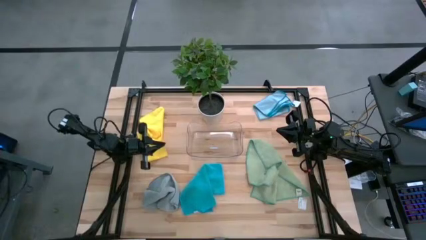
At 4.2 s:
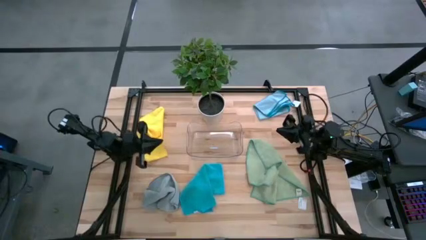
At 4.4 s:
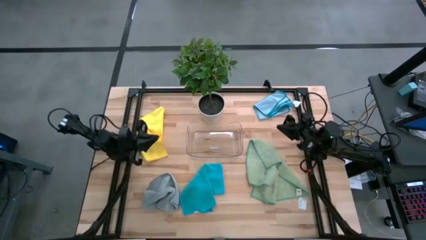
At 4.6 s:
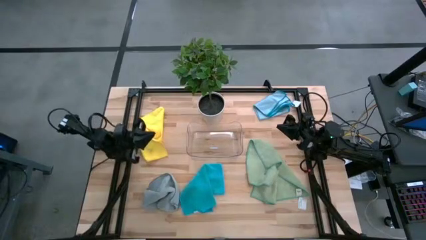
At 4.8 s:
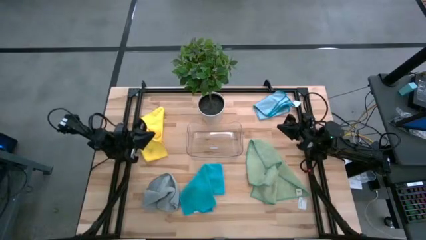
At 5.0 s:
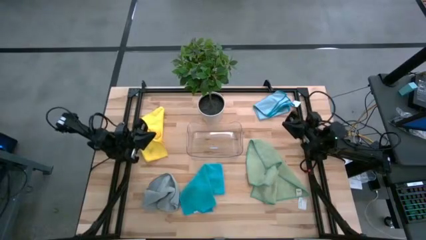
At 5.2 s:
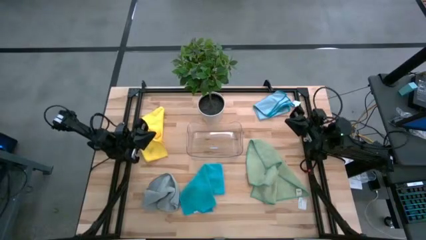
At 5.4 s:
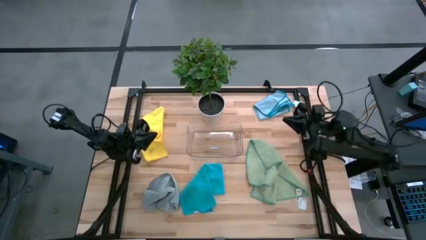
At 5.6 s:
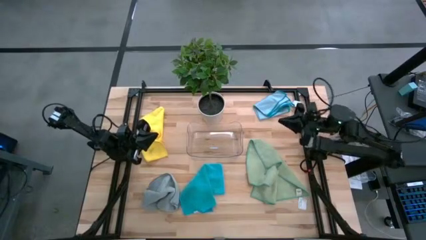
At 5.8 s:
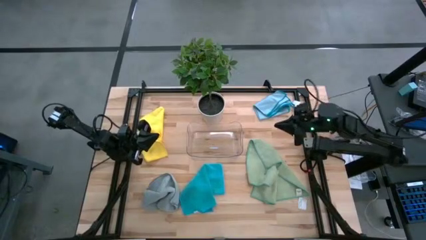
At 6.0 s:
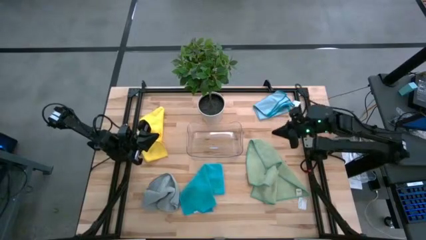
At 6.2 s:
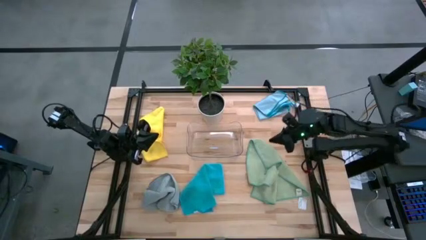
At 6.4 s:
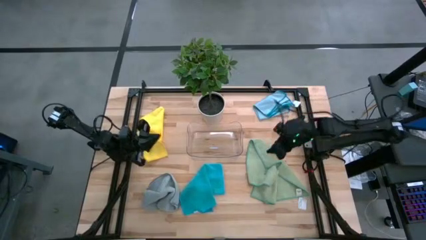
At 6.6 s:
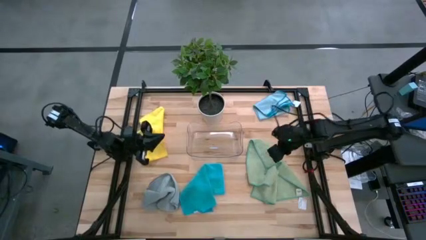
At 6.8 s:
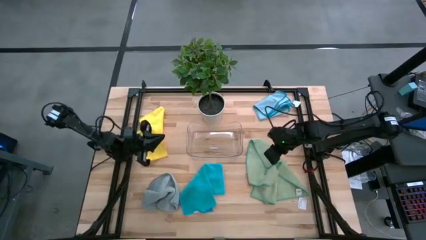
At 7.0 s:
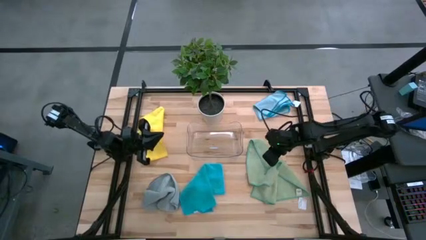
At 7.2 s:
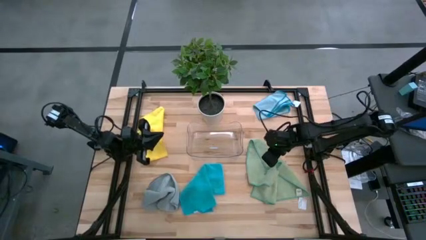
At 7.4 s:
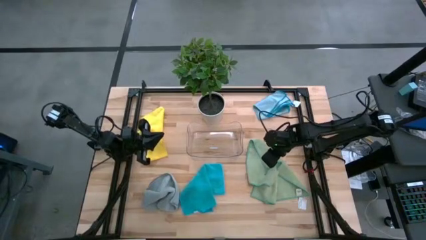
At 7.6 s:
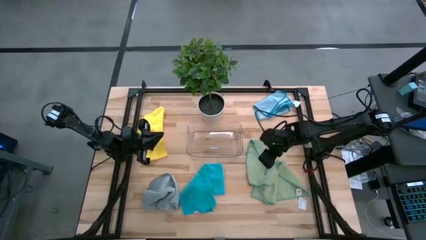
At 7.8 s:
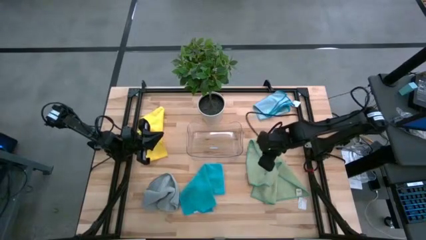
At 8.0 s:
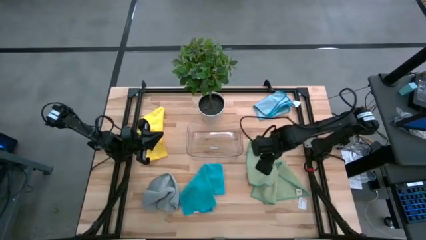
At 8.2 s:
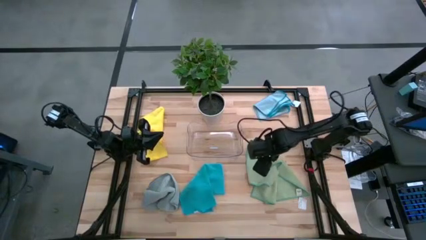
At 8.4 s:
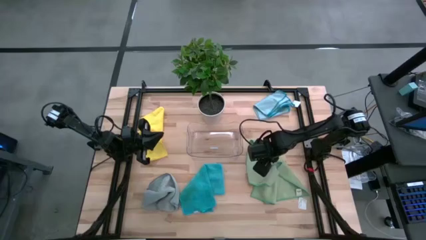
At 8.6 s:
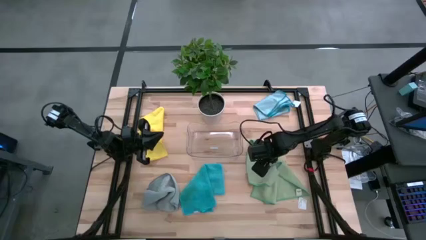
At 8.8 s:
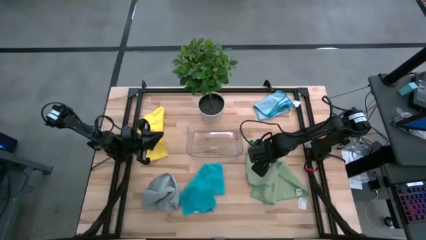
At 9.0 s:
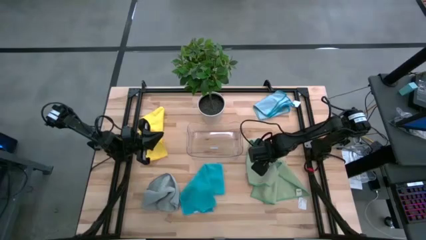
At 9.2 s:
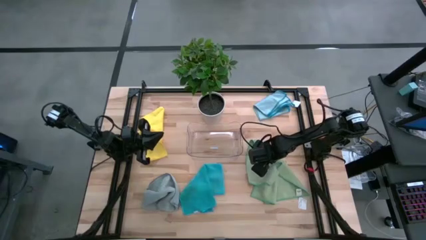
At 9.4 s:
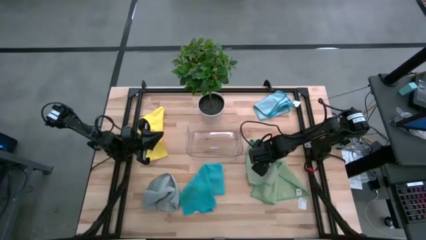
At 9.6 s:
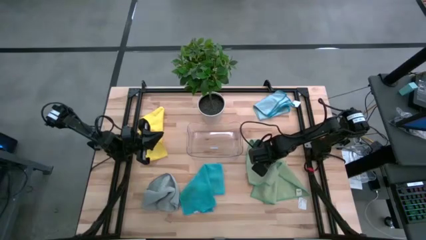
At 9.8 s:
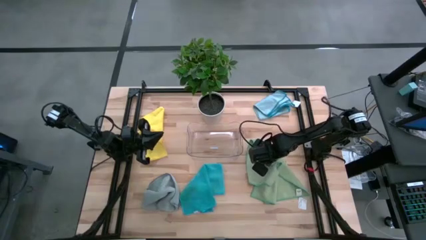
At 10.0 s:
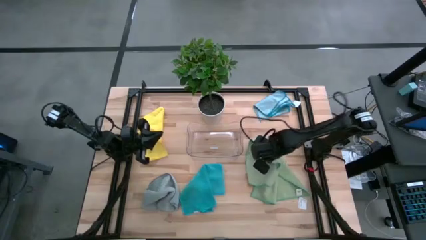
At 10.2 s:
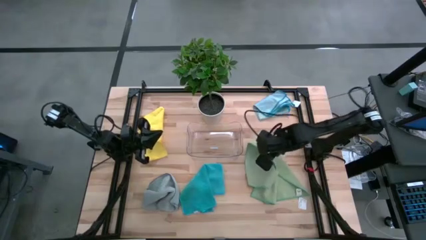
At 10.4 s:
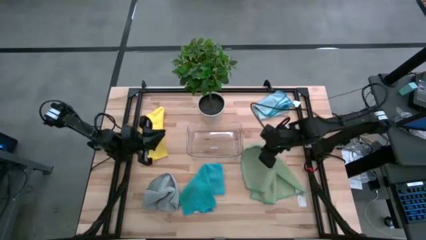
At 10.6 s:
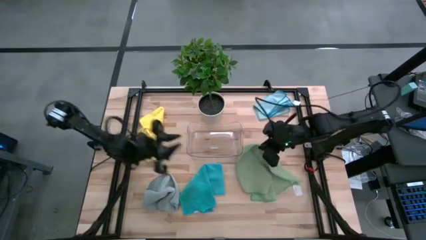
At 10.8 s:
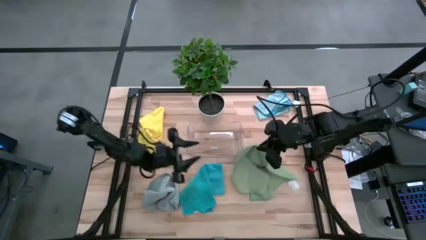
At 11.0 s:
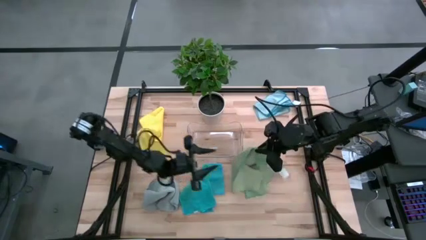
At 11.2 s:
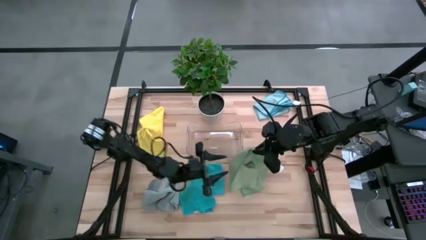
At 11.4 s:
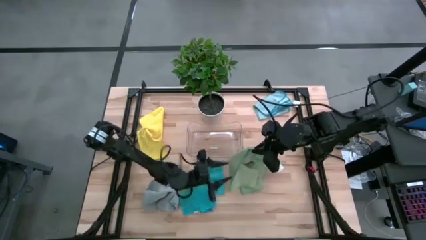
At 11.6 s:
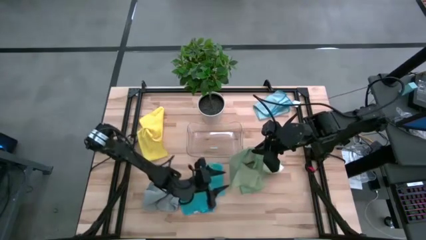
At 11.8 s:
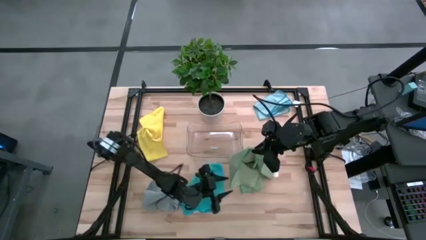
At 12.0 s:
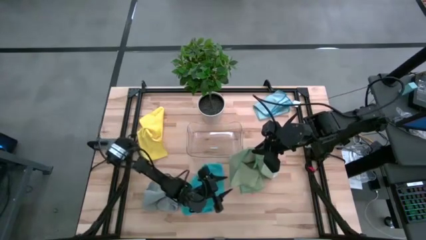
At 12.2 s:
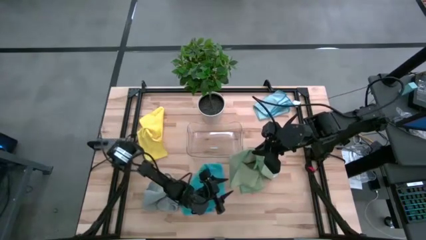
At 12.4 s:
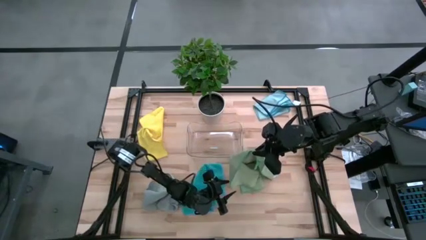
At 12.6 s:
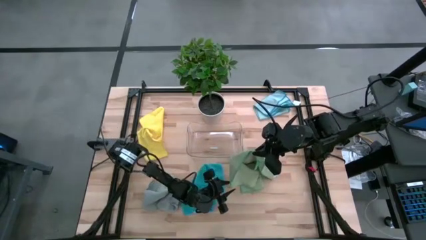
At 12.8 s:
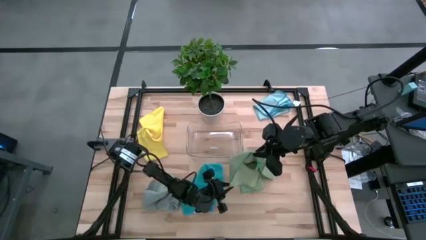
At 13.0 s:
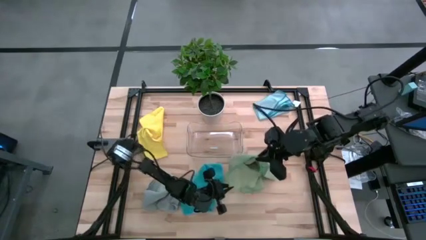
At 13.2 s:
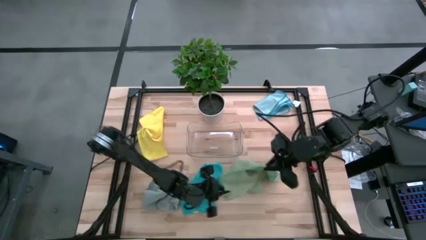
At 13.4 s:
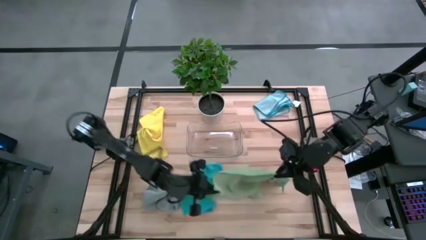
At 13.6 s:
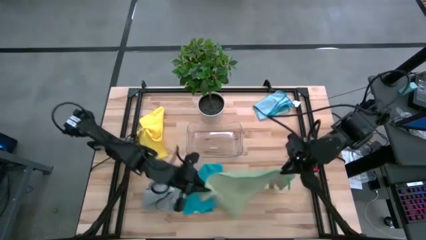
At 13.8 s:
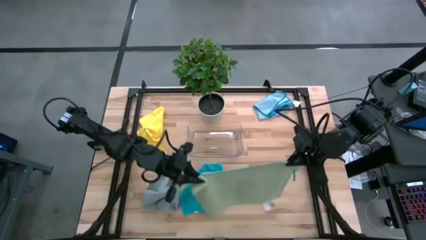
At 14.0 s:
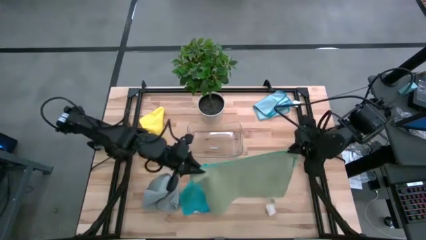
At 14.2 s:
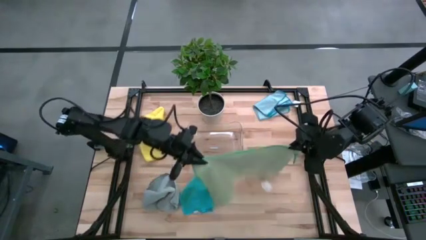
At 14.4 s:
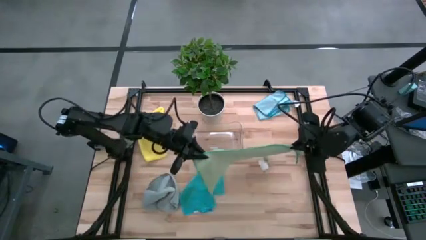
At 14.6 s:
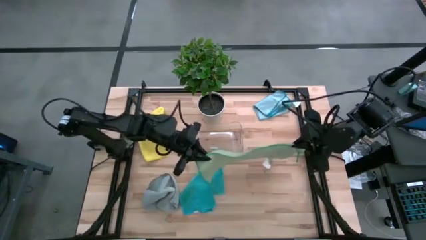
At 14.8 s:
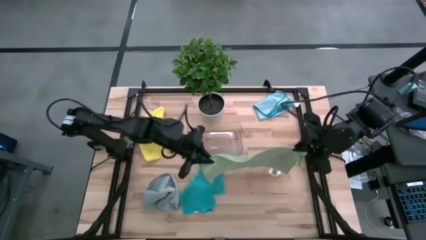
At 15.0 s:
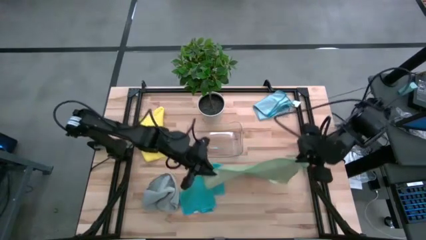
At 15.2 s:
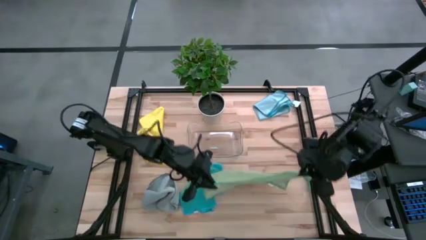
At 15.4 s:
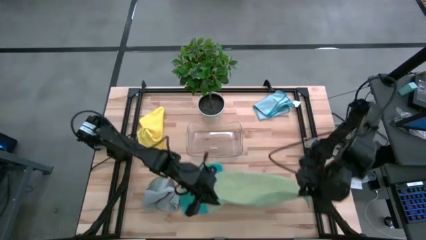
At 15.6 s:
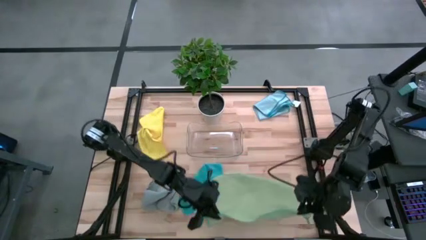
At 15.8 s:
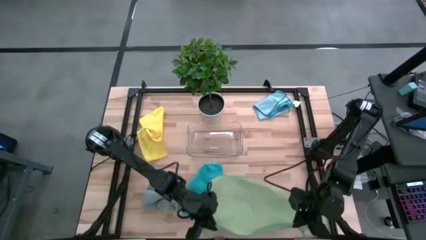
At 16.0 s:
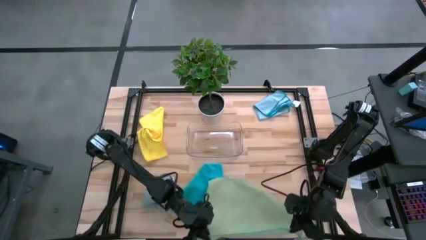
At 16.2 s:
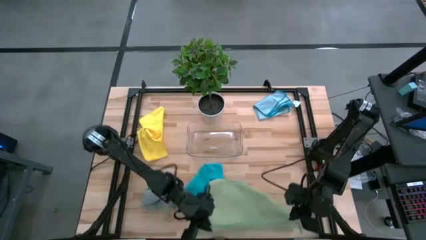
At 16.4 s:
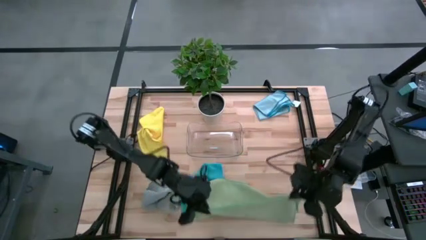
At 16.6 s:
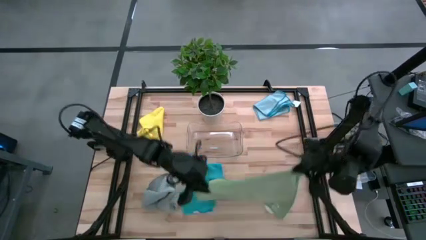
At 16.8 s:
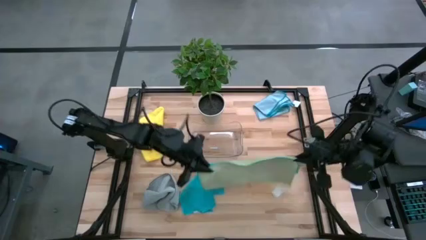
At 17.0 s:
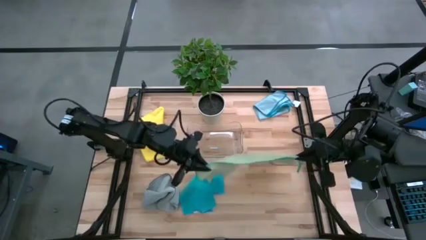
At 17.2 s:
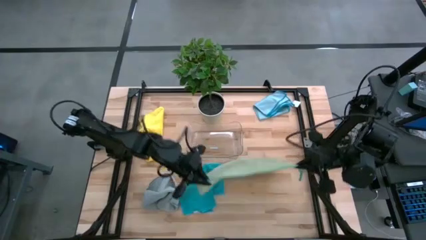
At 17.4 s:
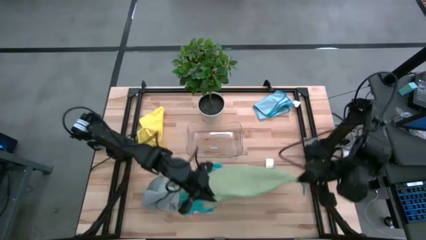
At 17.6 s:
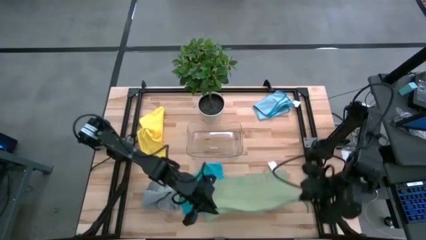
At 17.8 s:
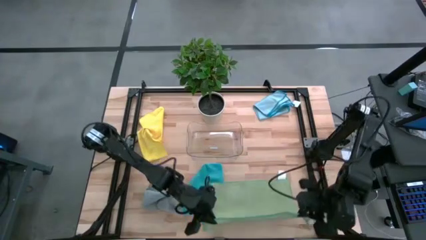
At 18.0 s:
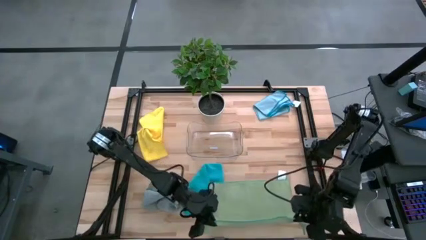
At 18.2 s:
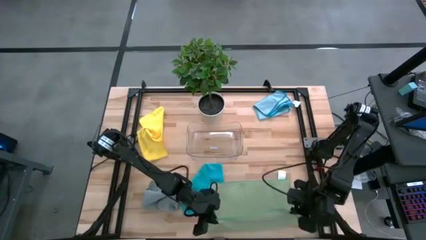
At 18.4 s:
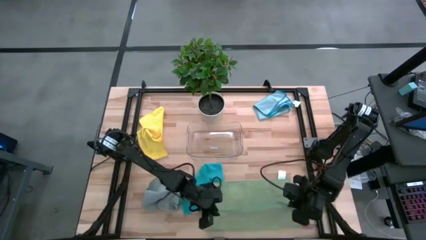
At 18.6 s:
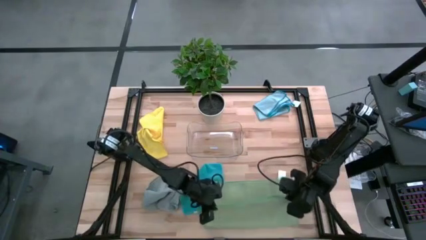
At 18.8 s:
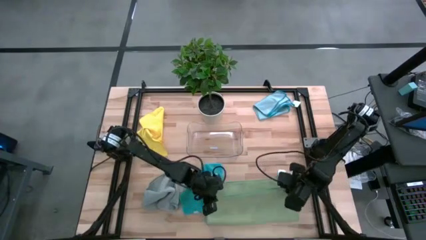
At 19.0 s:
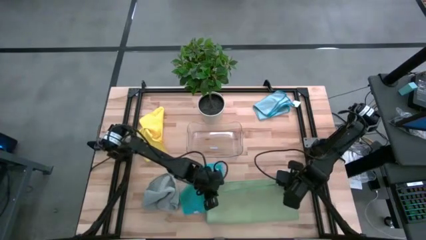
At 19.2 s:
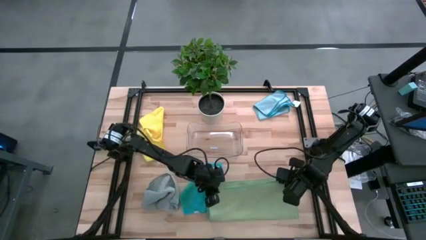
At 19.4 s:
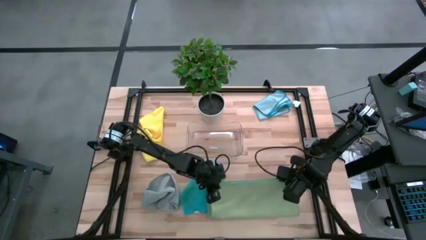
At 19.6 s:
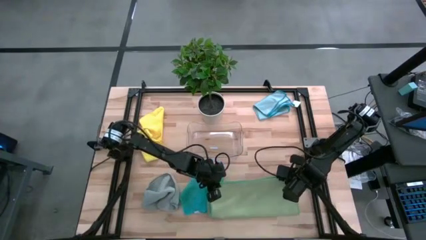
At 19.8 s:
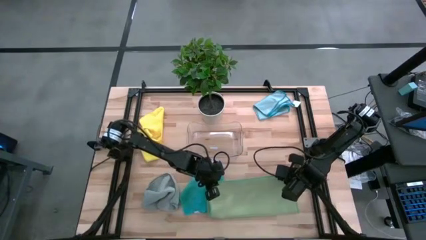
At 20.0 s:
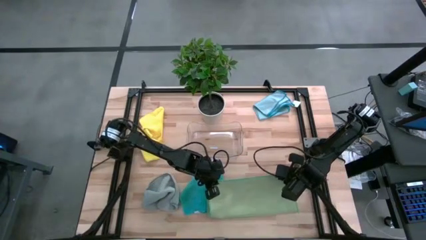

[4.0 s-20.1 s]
Task: Fold microfiber towels
Fold the green microfiber cloth
